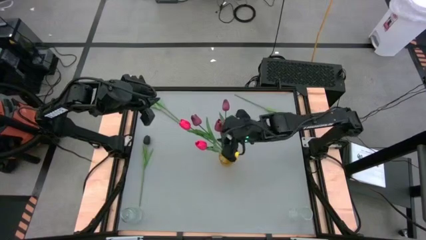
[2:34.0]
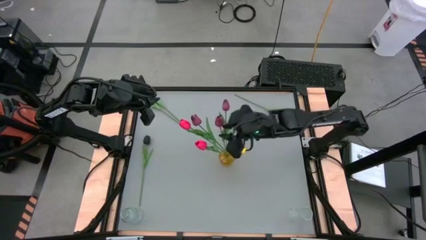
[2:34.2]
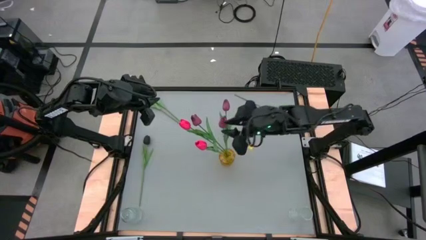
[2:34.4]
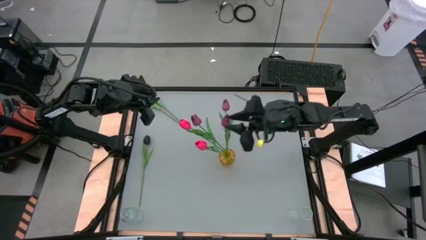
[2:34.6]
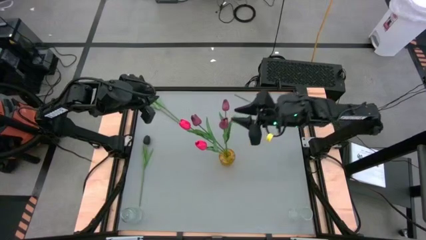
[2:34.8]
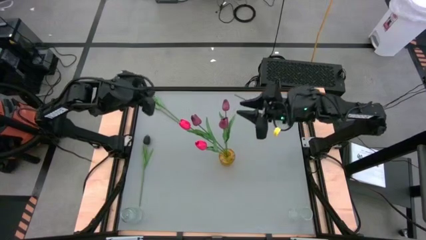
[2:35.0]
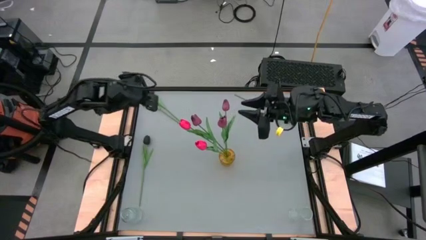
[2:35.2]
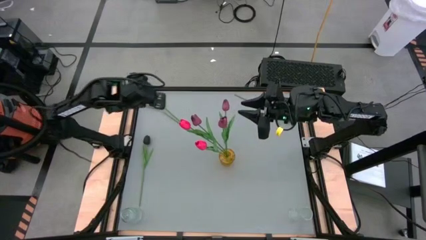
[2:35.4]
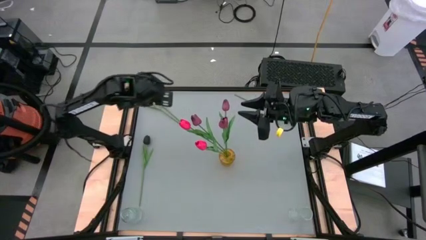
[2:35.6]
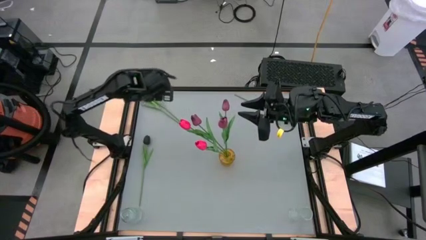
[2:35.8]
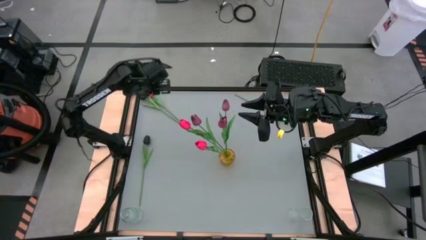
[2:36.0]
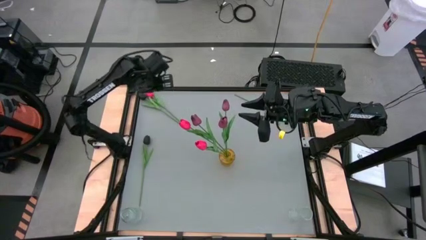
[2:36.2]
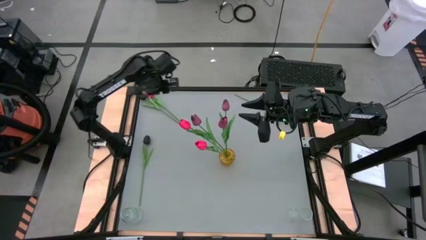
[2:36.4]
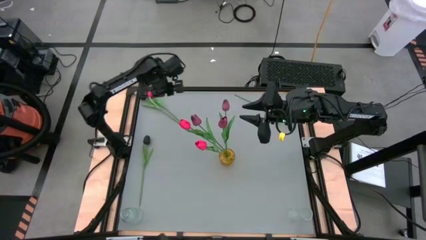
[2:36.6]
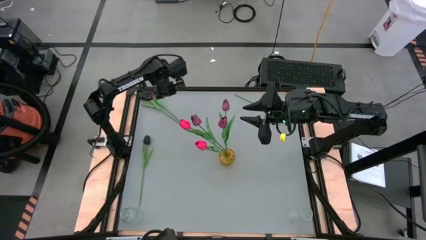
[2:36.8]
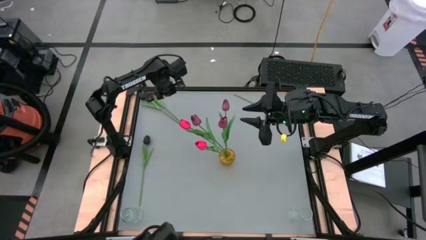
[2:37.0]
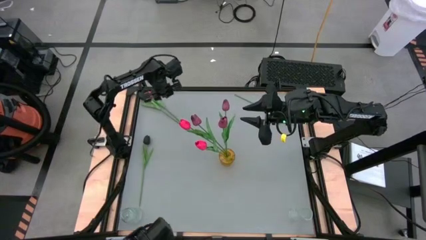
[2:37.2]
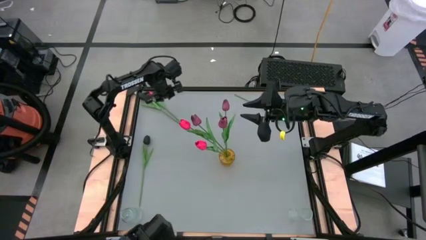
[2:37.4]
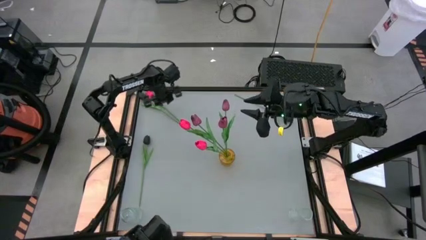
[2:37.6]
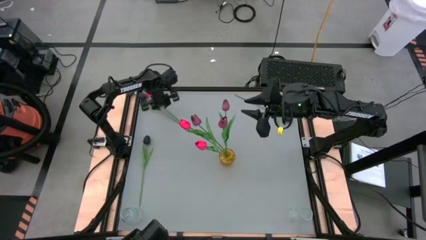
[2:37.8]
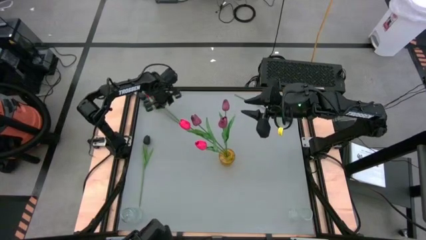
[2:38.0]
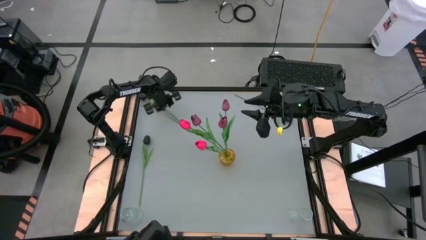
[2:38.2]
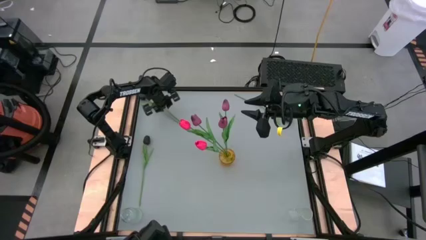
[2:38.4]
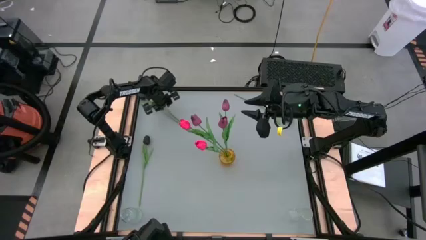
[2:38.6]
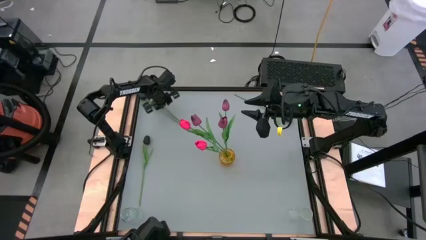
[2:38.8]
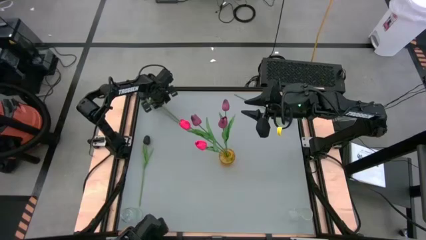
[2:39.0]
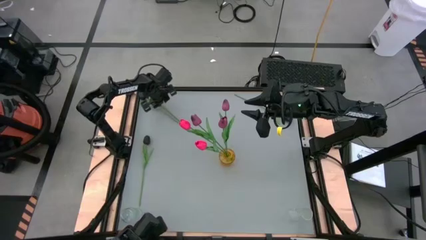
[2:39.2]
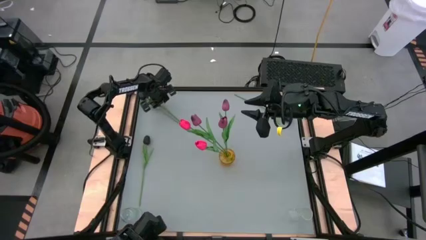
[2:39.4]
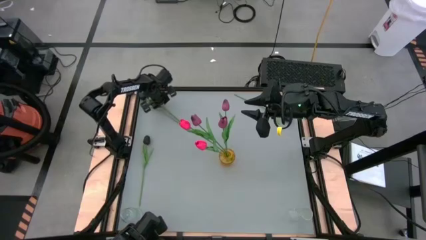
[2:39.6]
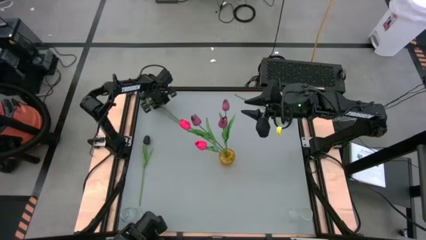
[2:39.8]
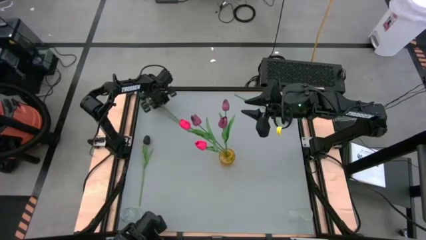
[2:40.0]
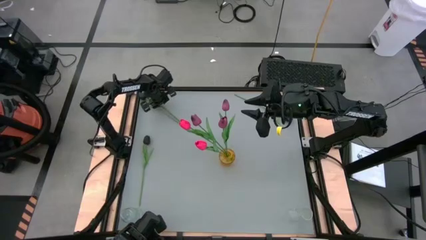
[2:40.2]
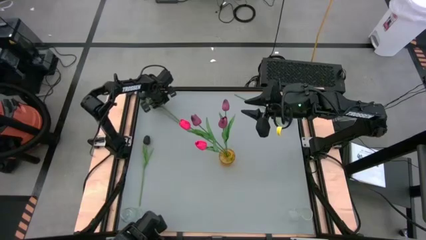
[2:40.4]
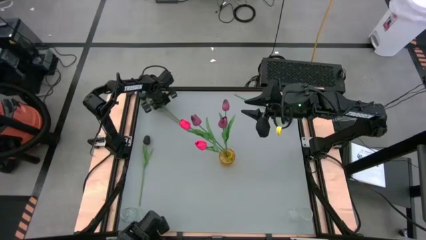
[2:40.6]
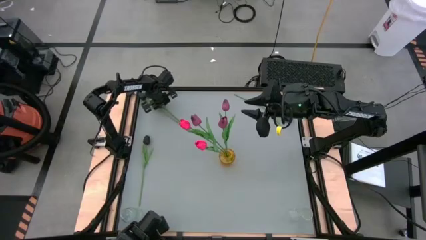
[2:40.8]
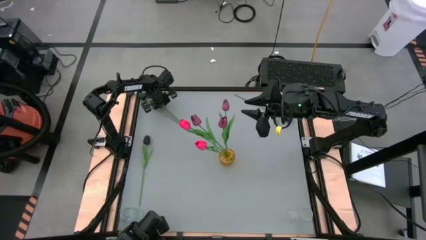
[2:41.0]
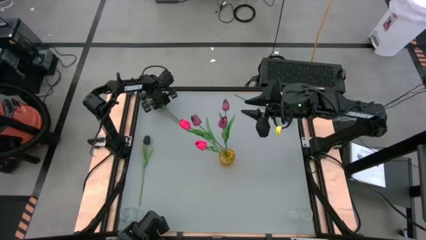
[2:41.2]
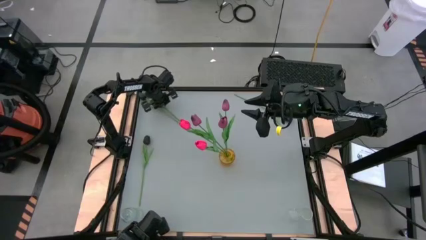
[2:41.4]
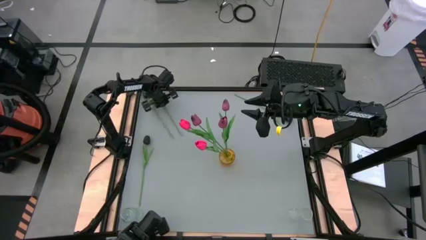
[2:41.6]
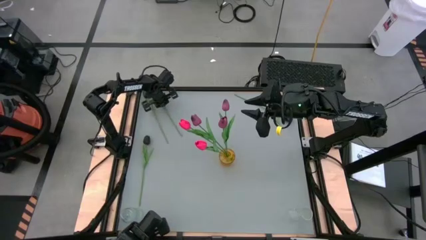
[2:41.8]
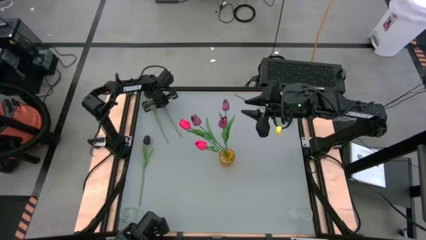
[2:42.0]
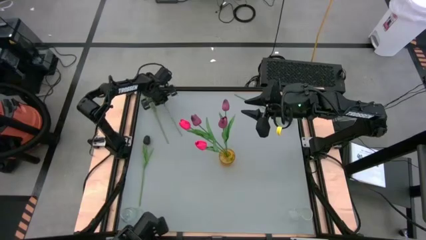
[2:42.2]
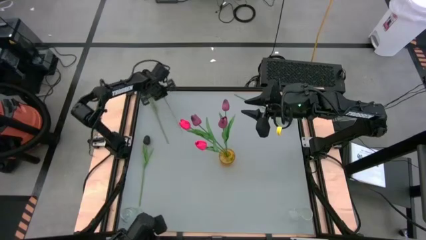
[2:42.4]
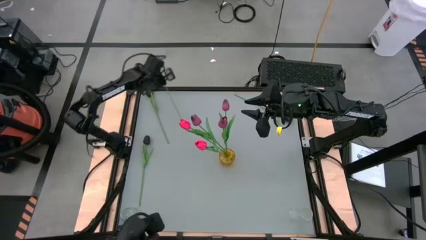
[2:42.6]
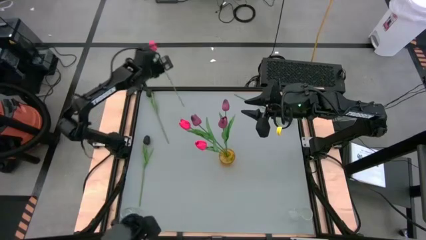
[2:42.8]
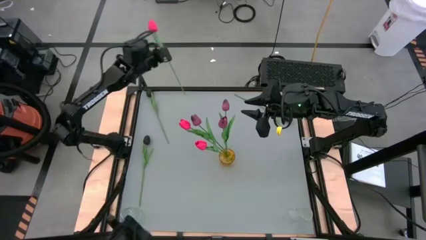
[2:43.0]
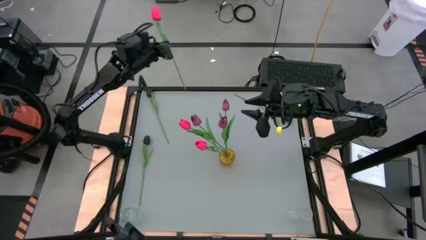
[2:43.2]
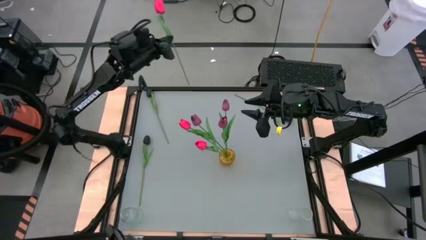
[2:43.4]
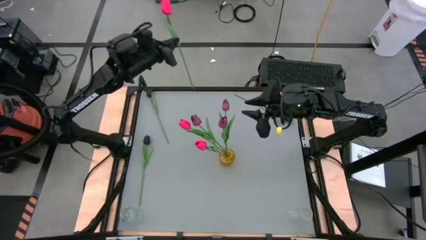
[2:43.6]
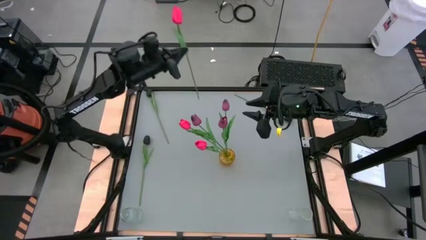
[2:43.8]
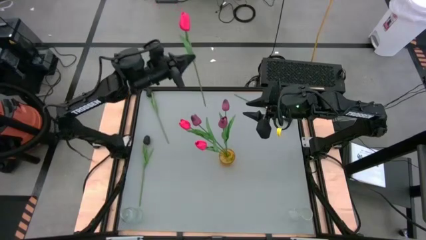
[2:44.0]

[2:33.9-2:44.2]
Task: Sort flowers into vase by color
Put the pink flower into the yellow vase
